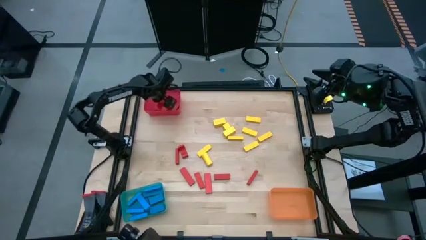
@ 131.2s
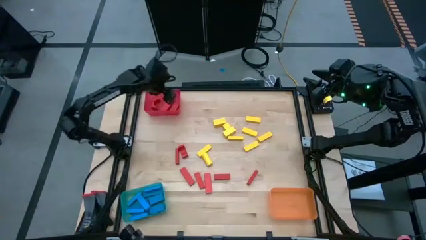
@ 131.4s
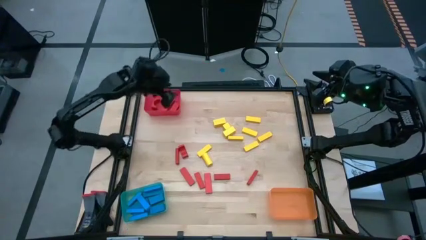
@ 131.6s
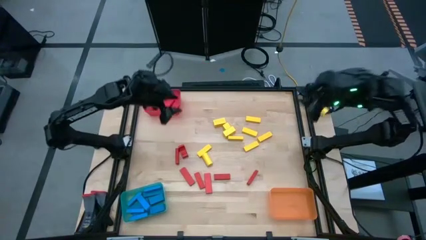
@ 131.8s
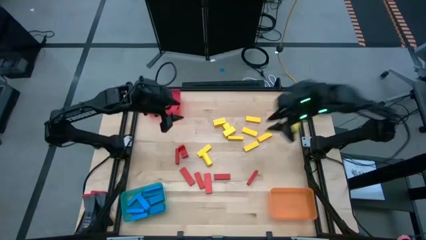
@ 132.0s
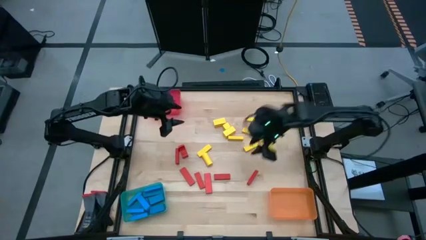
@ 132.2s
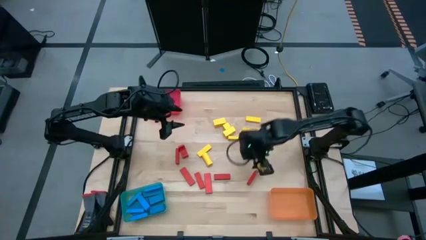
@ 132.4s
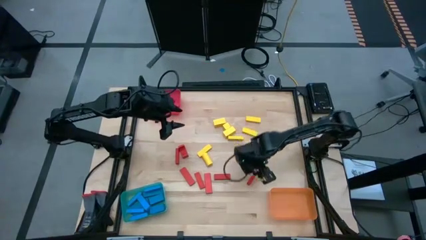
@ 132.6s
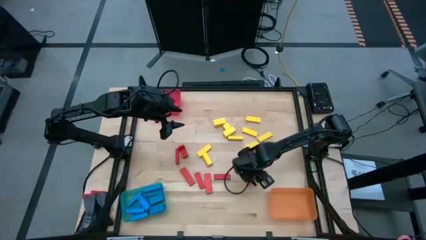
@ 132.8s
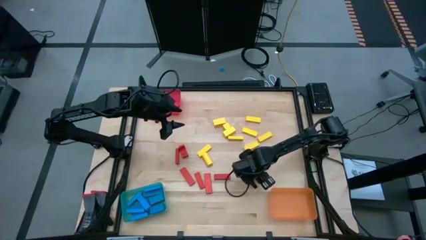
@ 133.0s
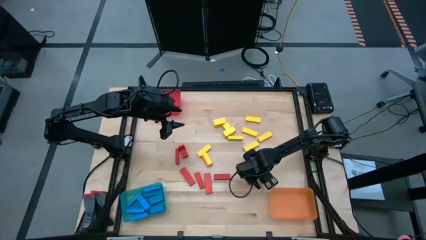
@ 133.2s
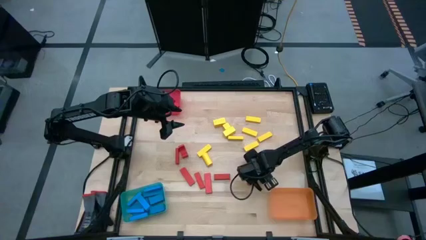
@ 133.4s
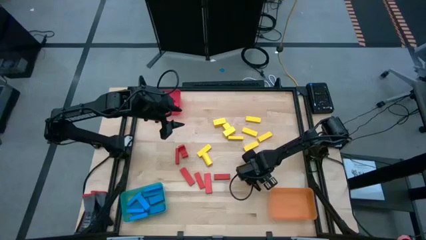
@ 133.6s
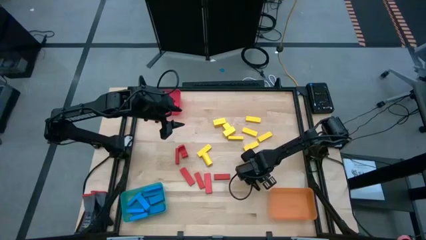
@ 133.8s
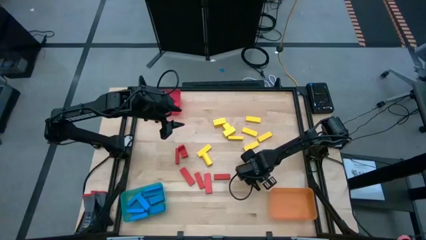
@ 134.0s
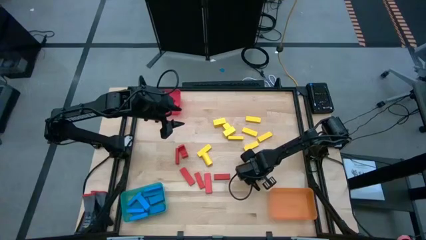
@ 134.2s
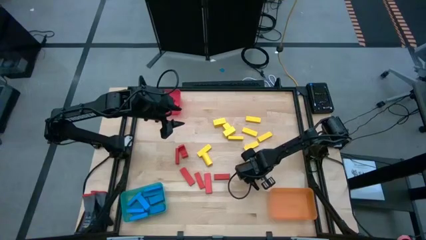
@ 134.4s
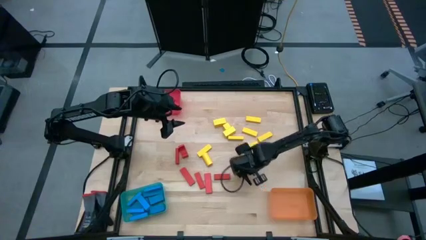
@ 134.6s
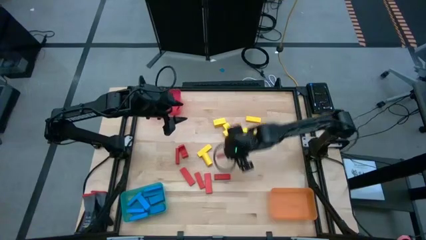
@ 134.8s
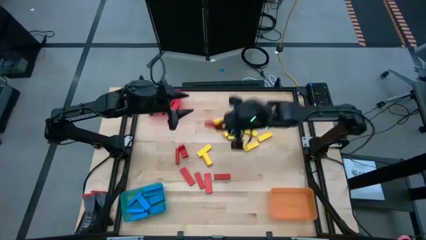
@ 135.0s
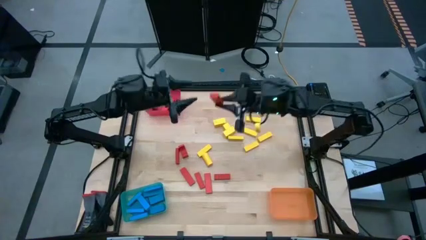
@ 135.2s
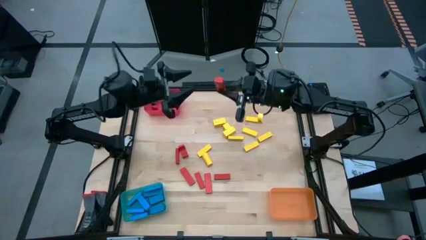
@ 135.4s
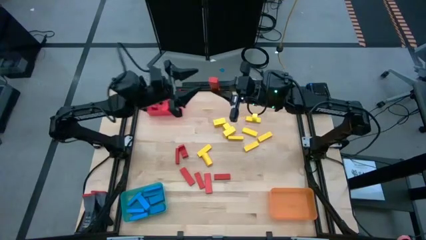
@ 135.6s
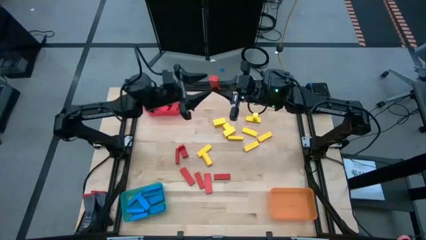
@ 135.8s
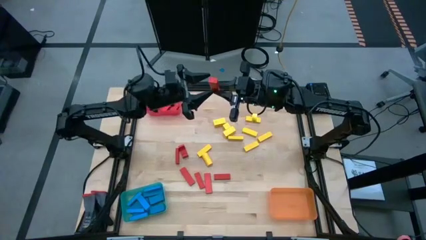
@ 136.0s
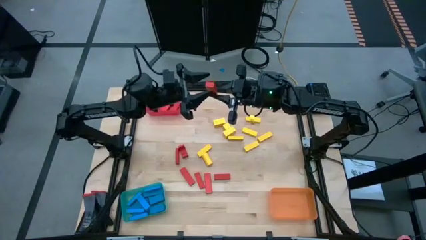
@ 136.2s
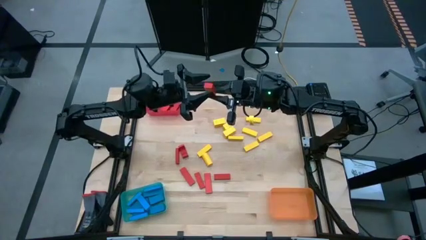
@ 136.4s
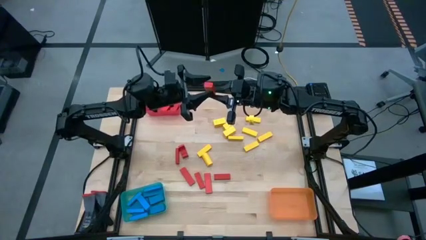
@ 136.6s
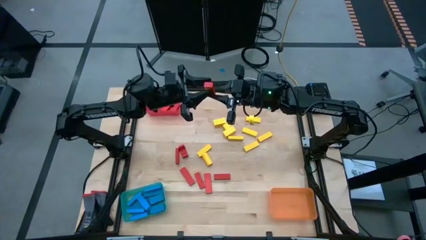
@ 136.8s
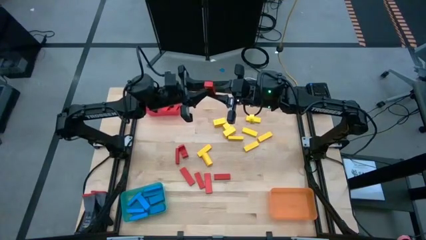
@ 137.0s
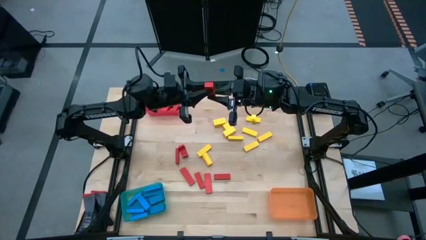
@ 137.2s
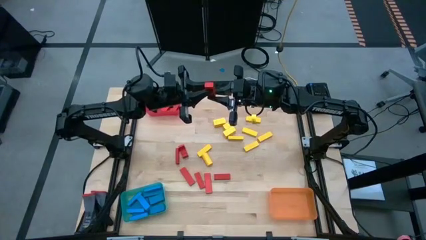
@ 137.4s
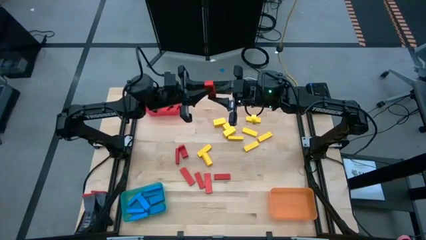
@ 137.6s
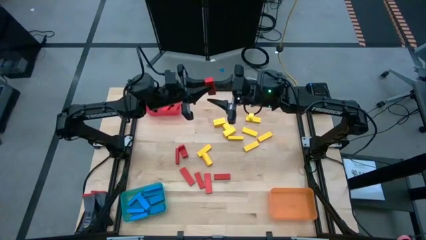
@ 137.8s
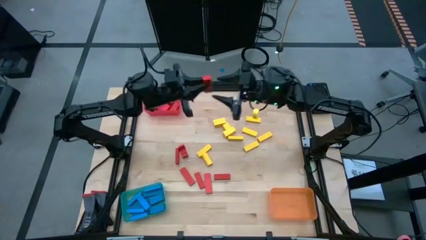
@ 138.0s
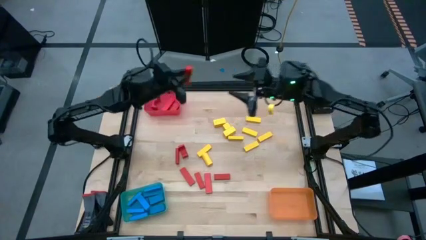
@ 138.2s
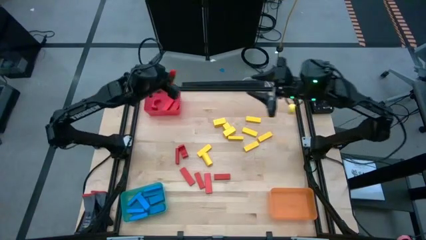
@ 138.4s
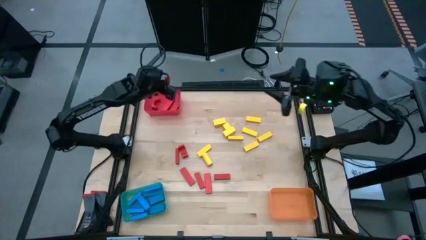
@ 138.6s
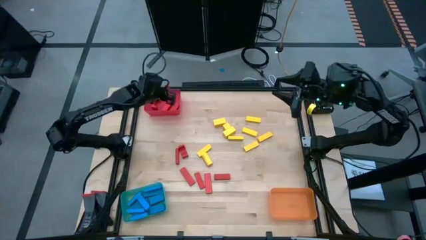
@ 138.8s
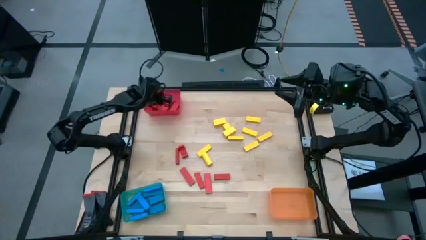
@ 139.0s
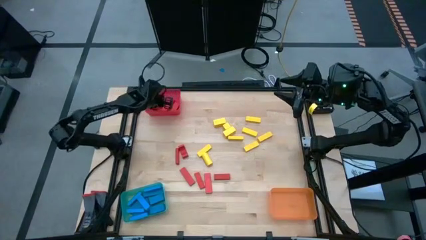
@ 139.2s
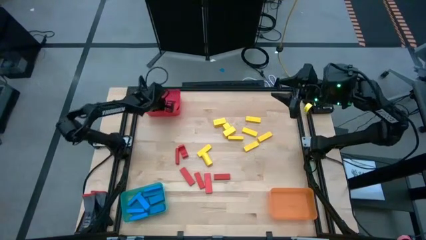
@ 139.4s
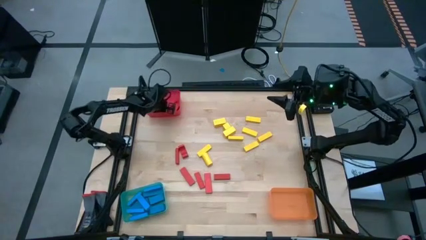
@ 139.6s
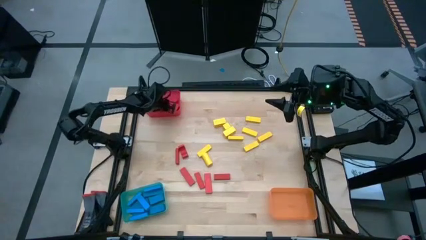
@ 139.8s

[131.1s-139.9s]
Task: Sort blocks
Put the red block into the red bin

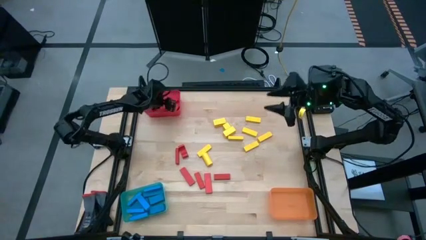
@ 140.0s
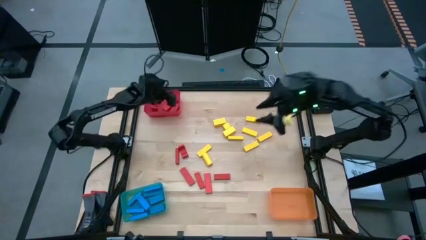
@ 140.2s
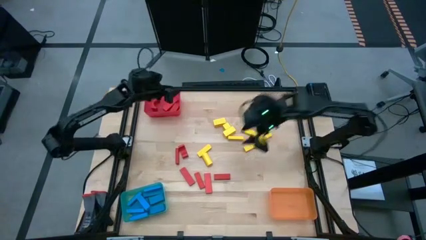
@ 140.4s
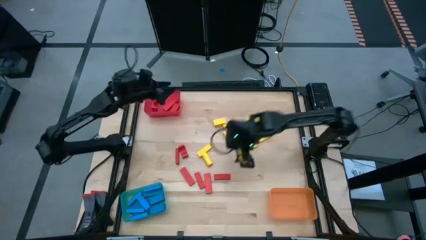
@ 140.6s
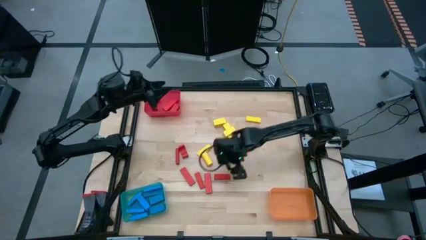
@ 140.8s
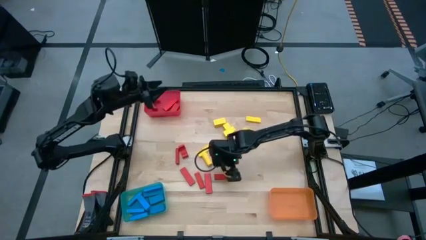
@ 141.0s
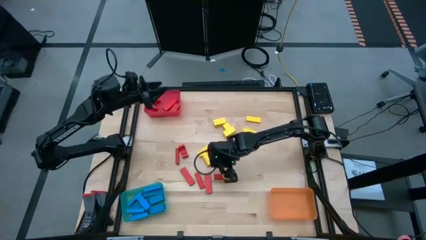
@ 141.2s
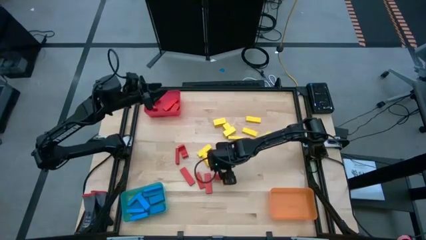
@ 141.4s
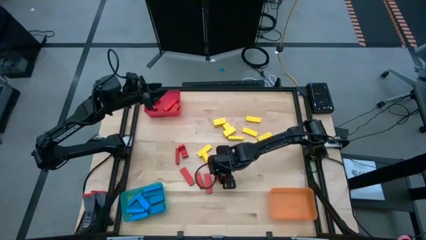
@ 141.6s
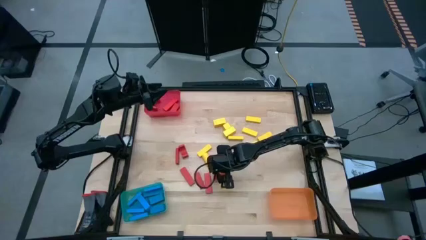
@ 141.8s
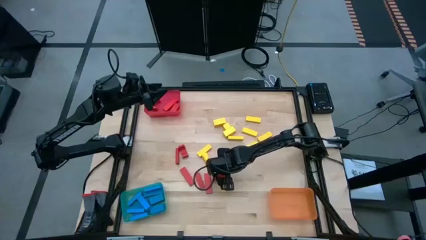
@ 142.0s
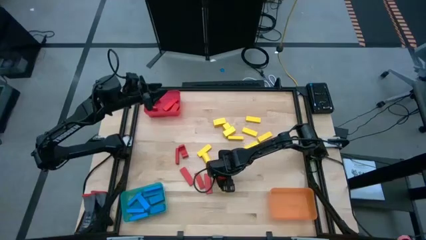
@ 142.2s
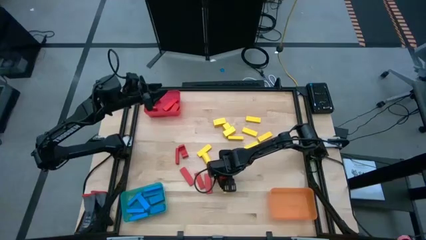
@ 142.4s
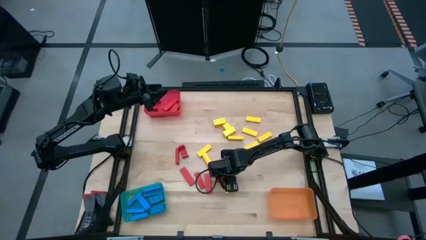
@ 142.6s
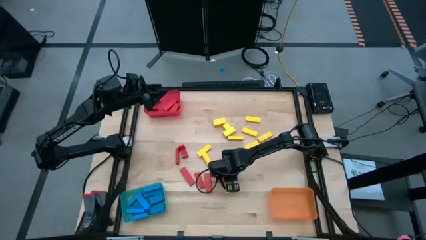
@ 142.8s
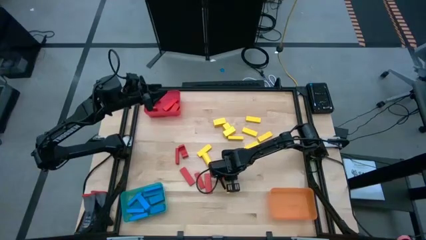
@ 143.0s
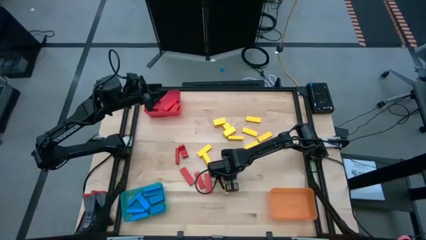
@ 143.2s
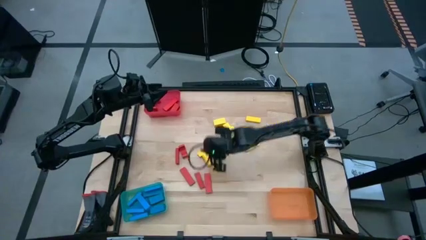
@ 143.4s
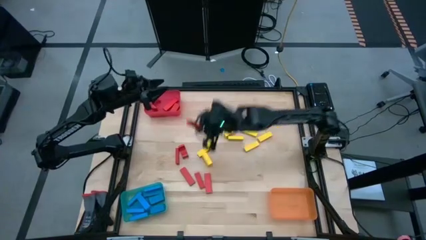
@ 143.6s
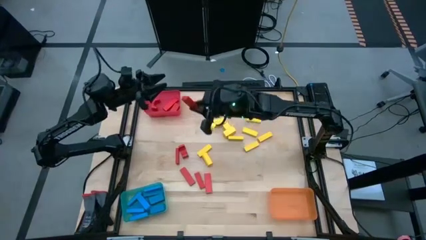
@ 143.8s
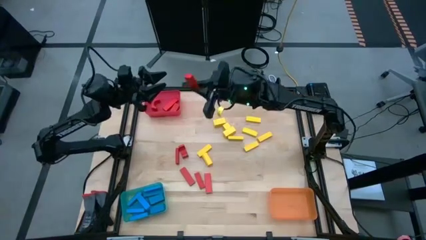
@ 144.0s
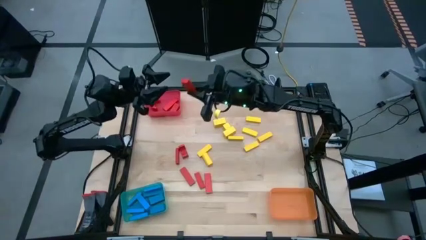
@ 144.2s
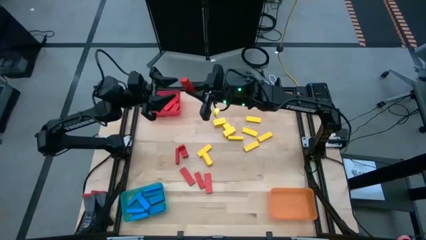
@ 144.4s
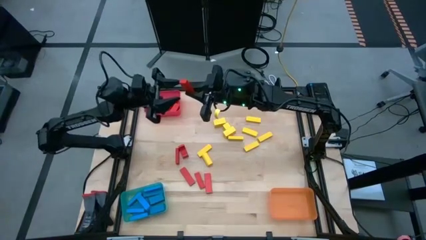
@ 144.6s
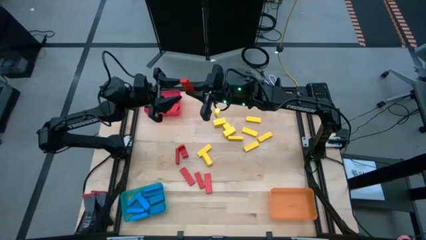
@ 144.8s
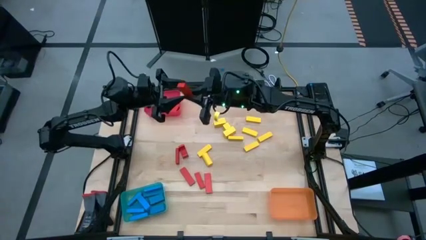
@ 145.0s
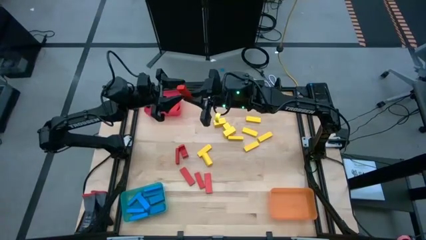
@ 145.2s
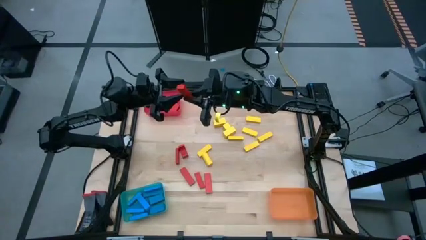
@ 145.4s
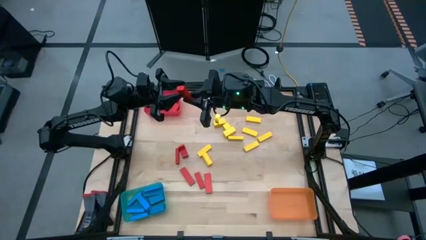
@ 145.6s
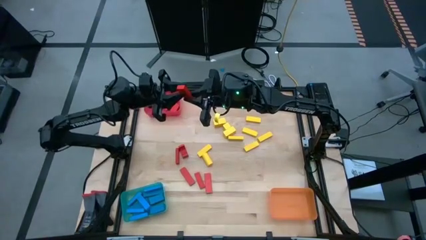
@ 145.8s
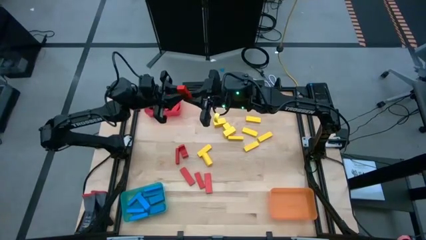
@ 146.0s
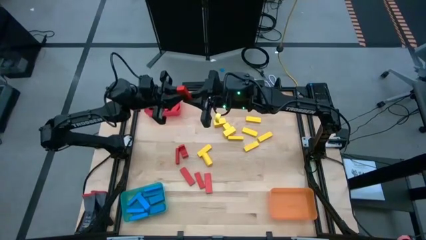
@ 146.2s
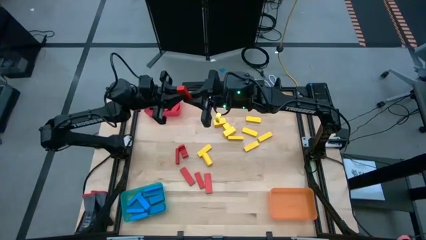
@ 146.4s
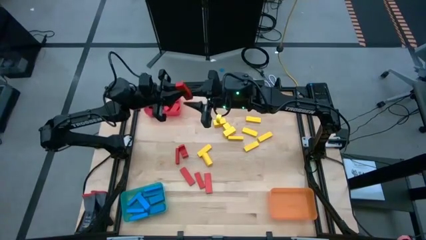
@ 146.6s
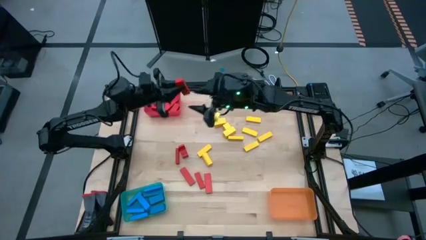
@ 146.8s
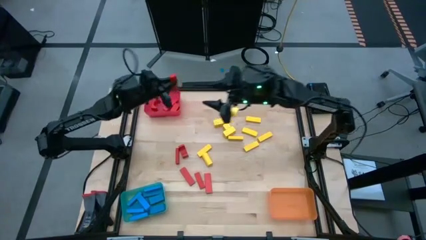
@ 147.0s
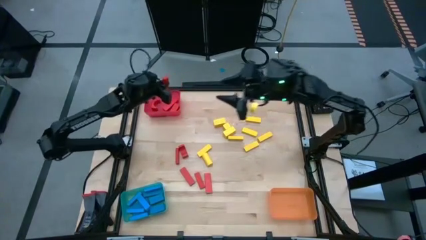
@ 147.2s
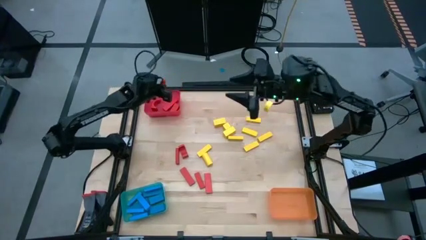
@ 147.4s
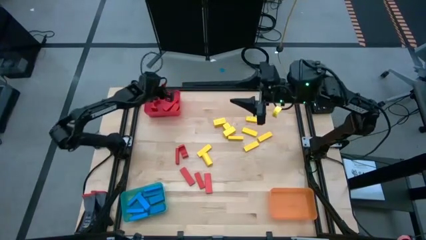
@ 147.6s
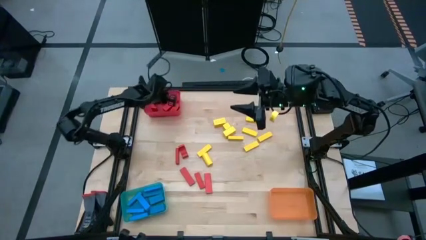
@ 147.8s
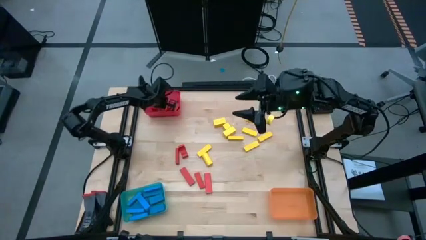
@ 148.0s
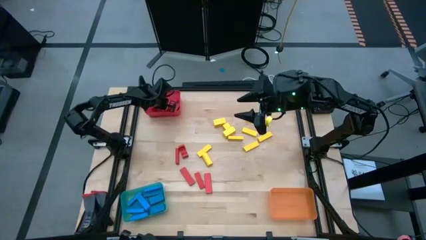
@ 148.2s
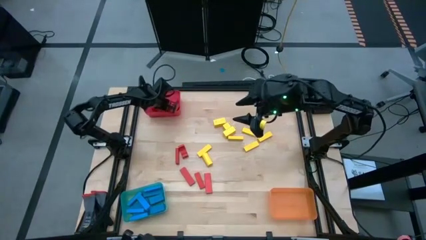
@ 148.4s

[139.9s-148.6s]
Put the red block into the red bin
